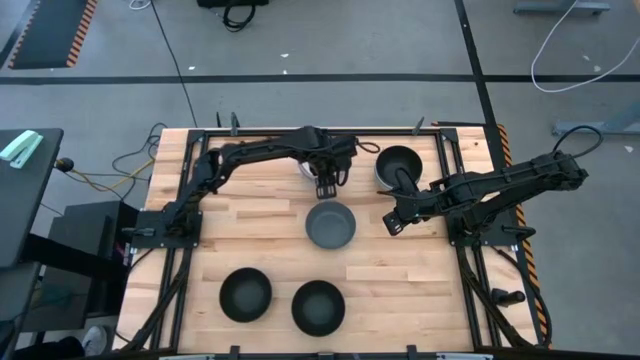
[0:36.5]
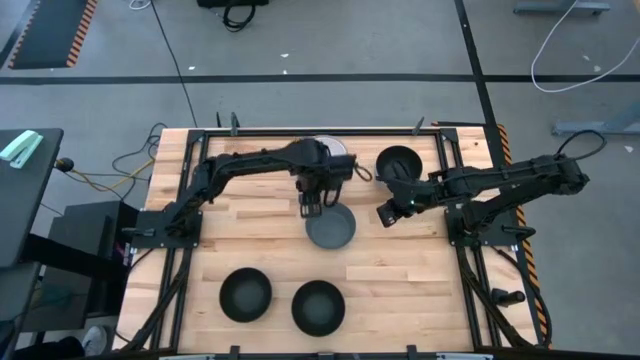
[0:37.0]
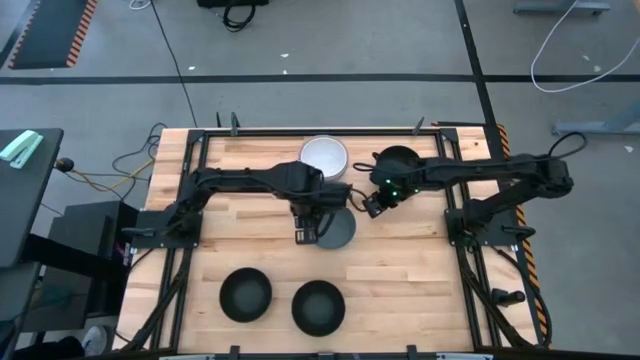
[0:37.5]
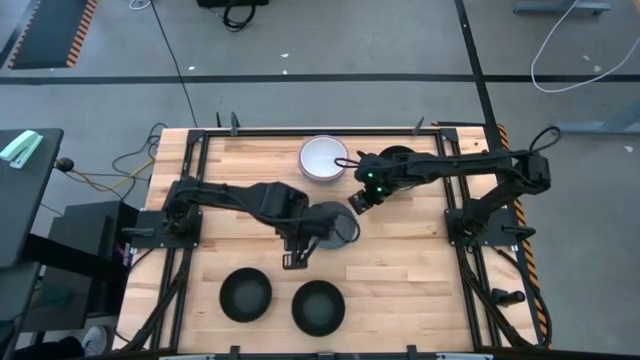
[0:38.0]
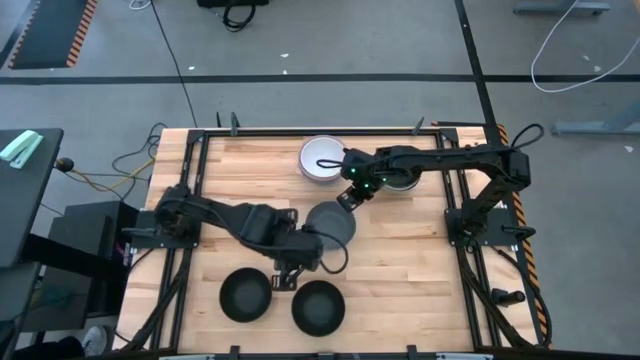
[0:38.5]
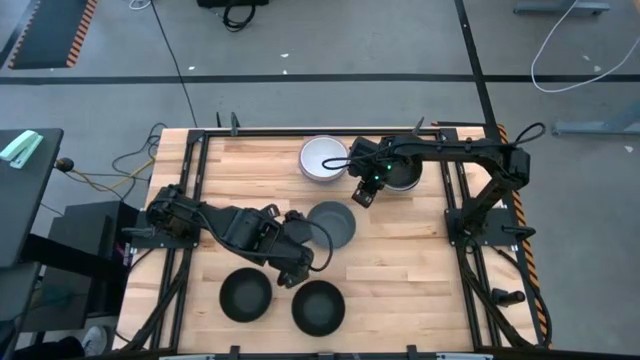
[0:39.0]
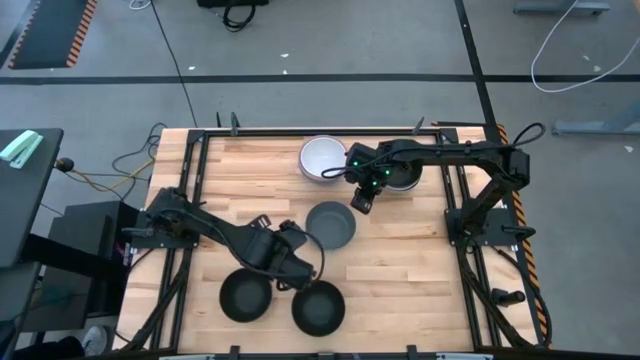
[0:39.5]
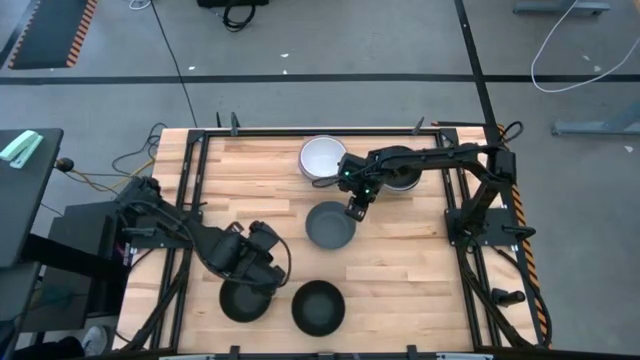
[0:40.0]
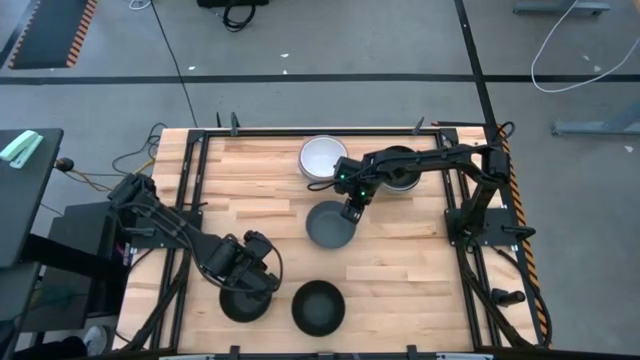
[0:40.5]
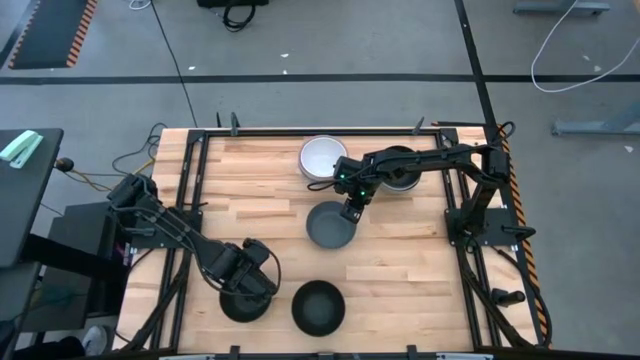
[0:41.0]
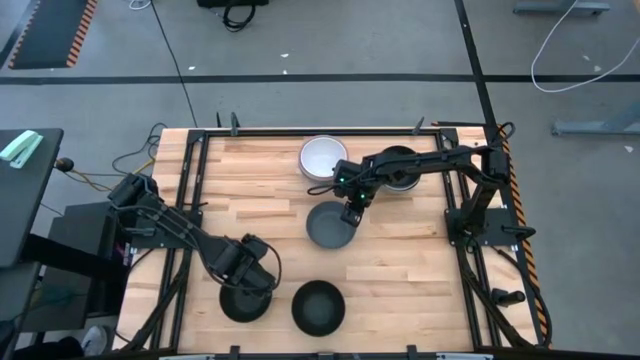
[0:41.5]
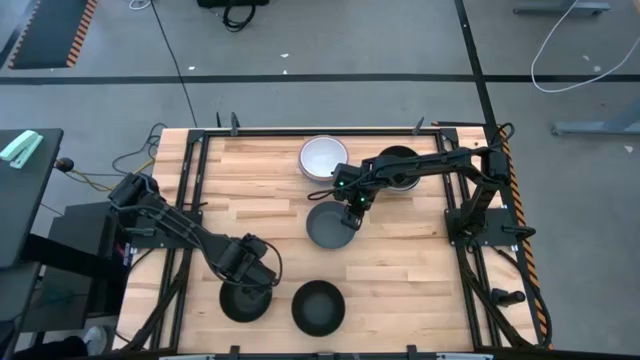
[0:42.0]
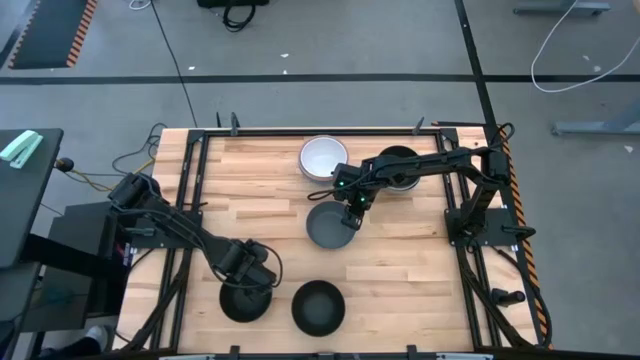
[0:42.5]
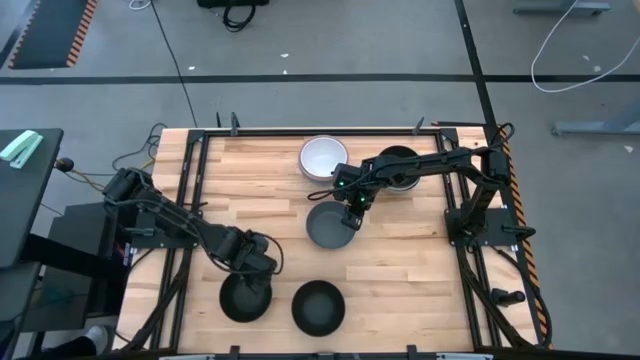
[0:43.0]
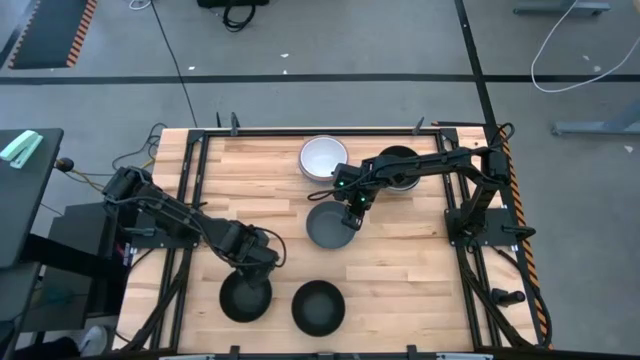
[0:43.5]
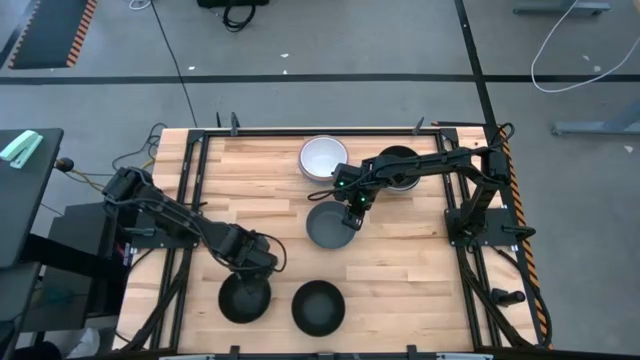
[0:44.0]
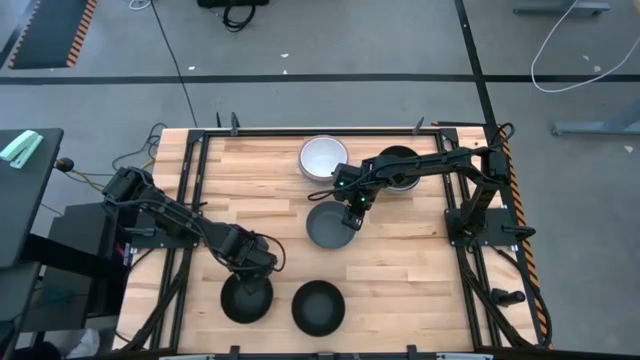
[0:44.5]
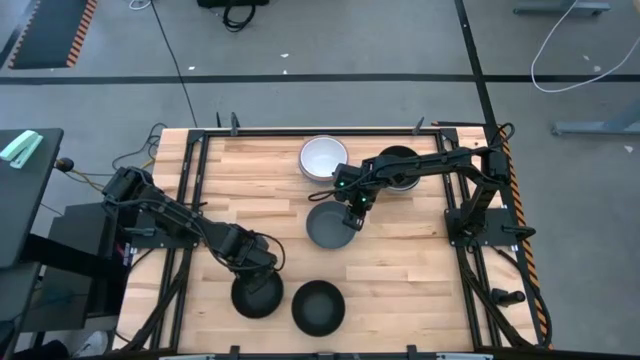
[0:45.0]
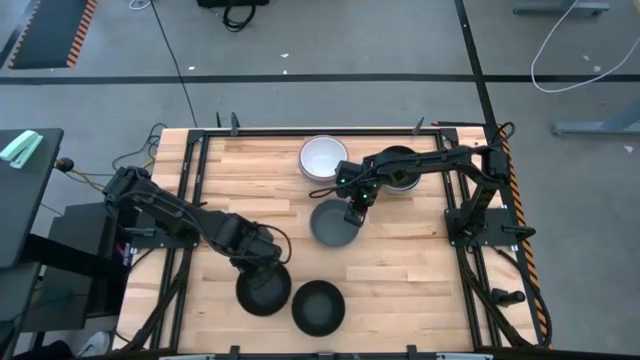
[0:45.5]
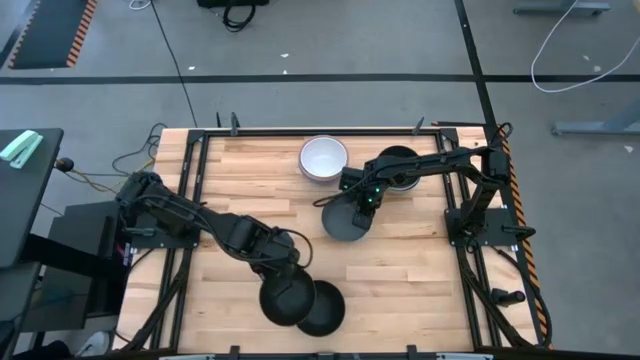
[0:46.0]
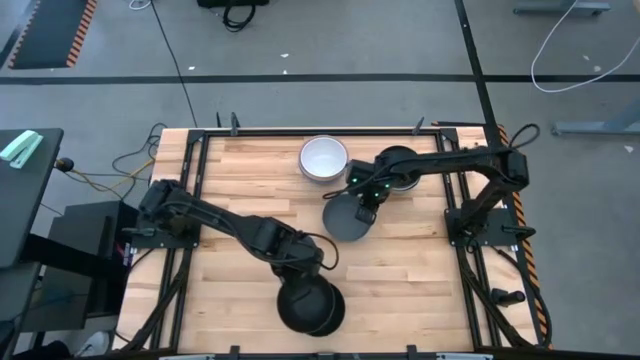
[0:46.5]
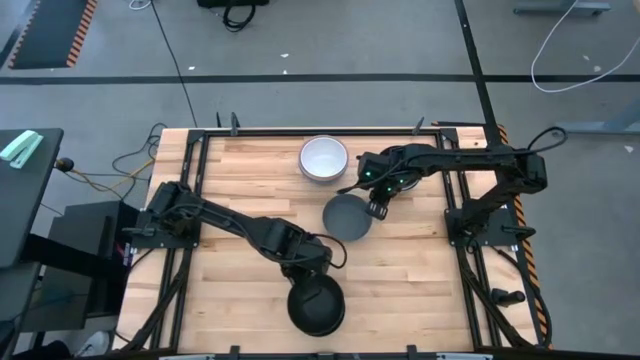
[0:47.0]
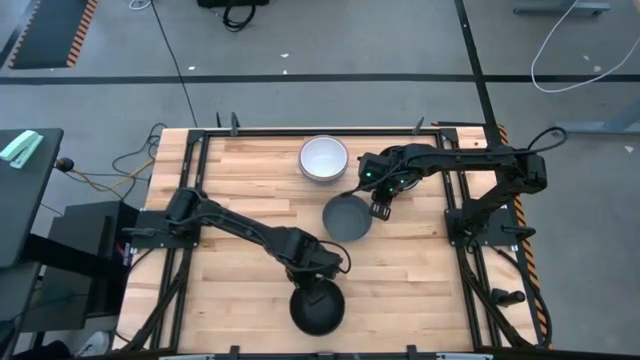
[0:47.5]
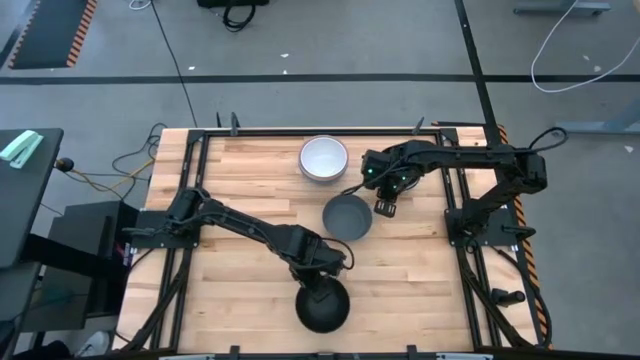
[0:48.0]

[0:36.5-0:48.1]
Task: Nest bowls inside each other
Stack the left black bowl on top of the right black bowl

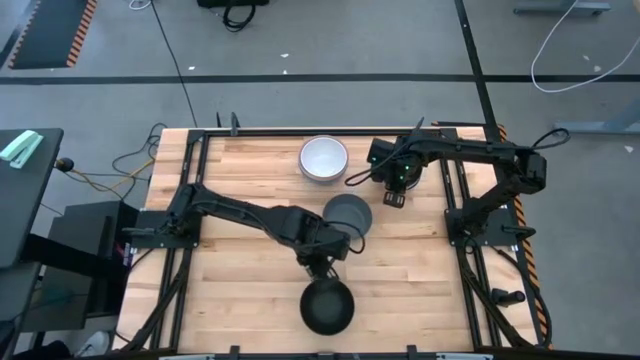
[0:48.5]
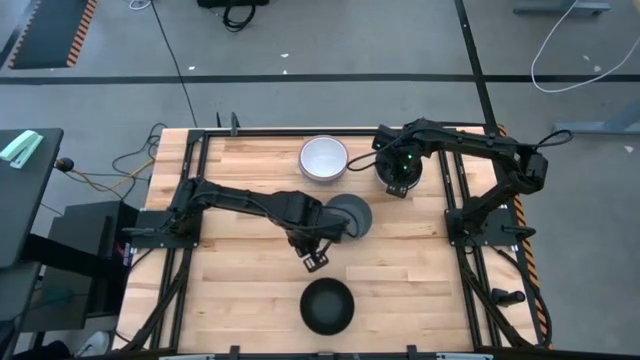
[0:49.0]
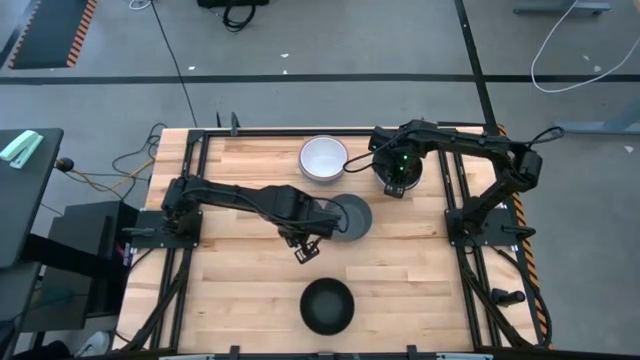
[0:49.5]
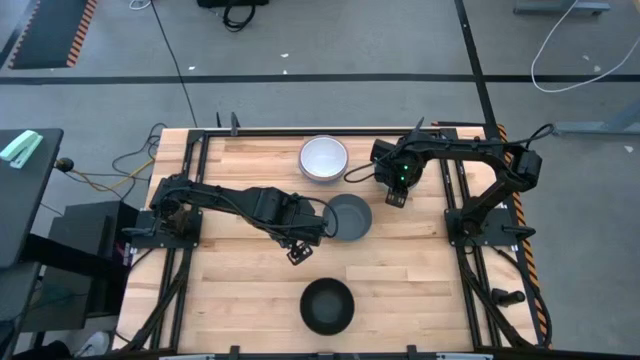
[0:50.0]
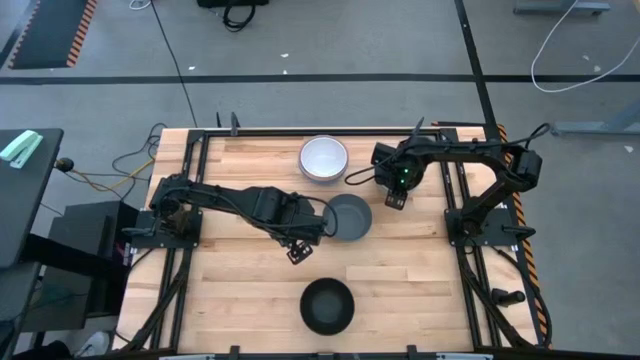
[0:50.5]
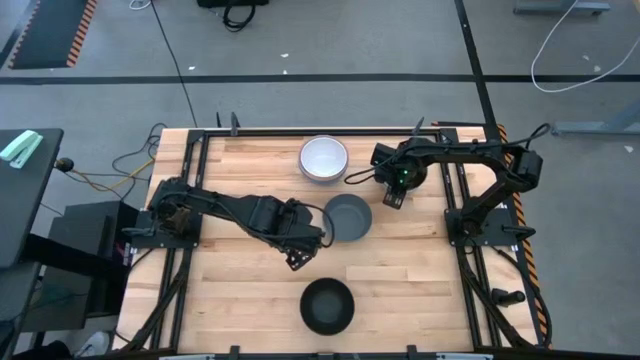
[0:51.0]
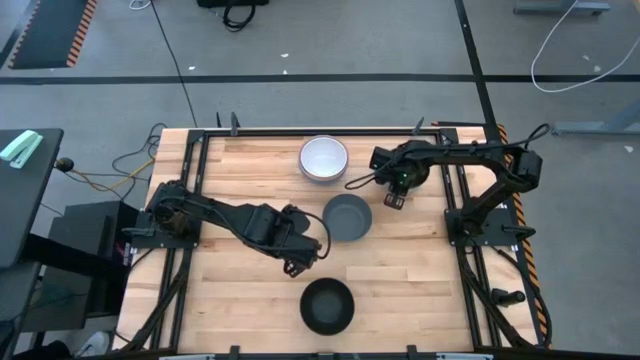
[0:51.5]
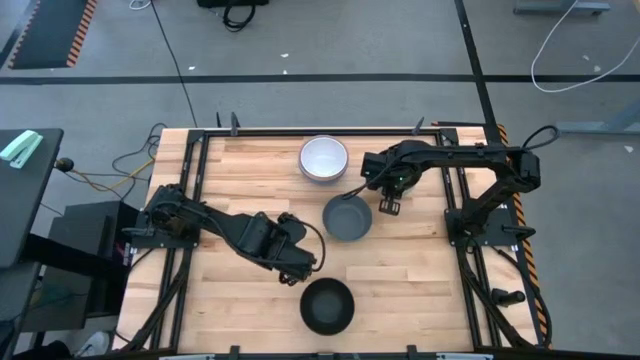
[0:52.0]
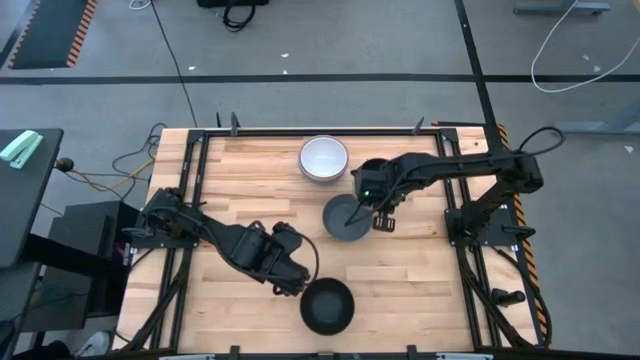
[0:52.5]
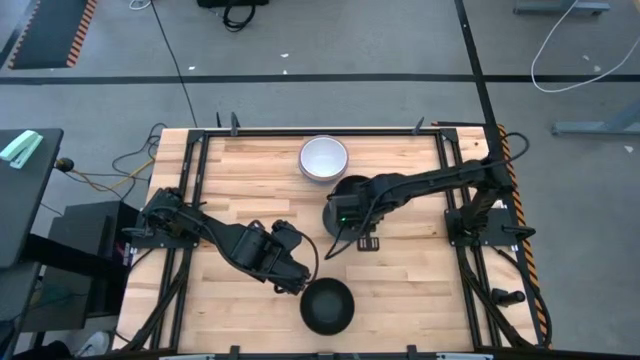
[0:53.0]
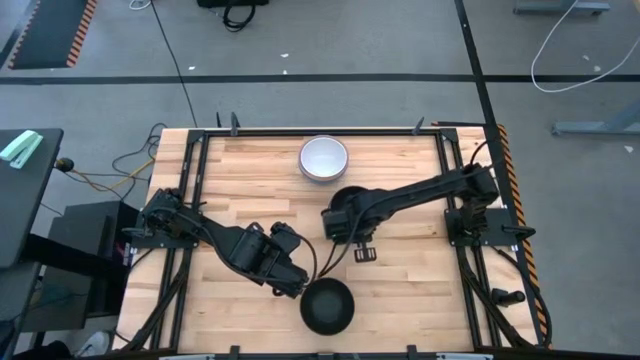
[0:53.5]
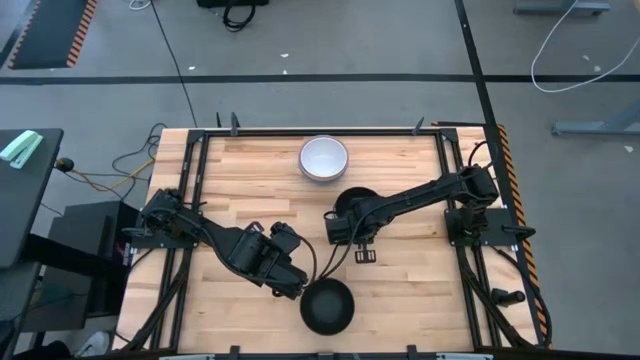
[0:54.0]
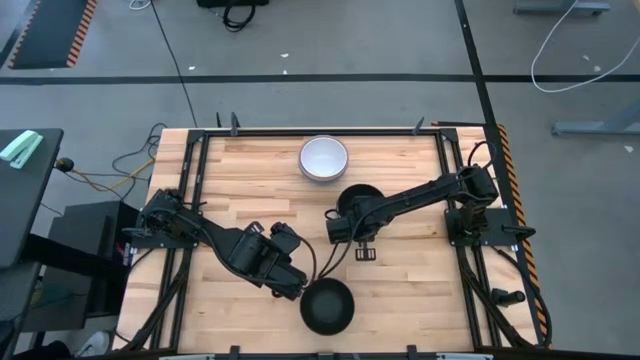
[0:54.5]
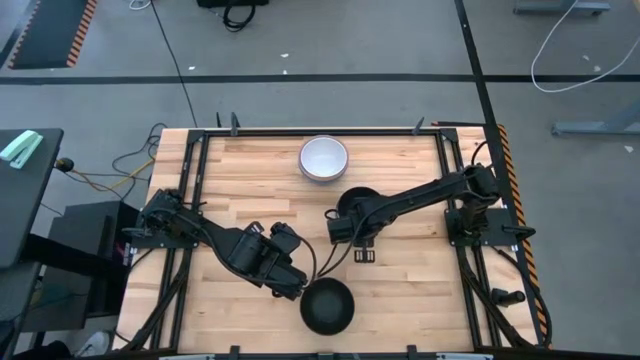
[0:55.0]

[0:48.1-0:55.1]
Stack the right stacked bowls on top of the gray bowl

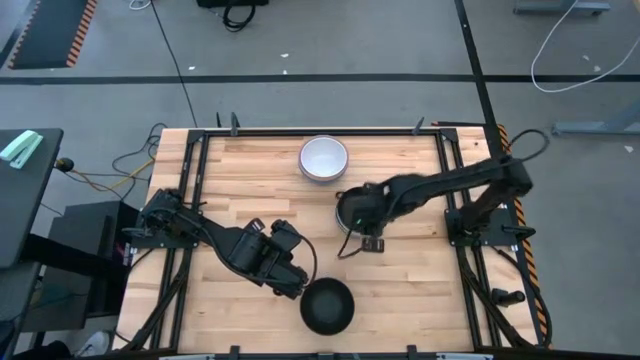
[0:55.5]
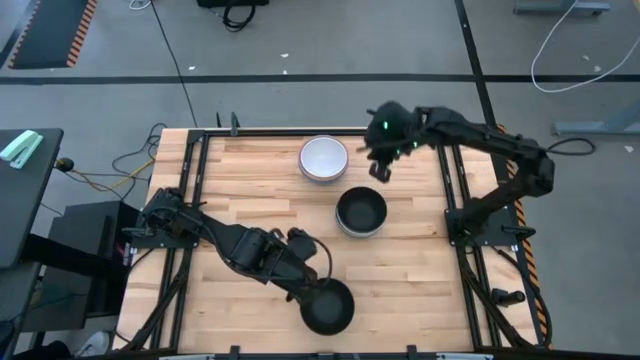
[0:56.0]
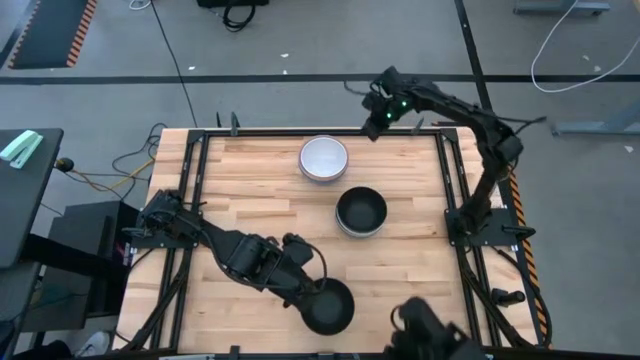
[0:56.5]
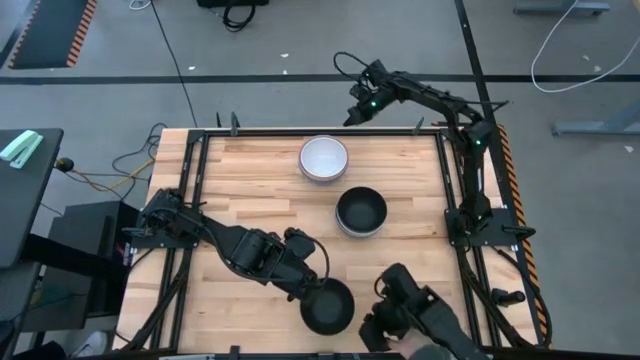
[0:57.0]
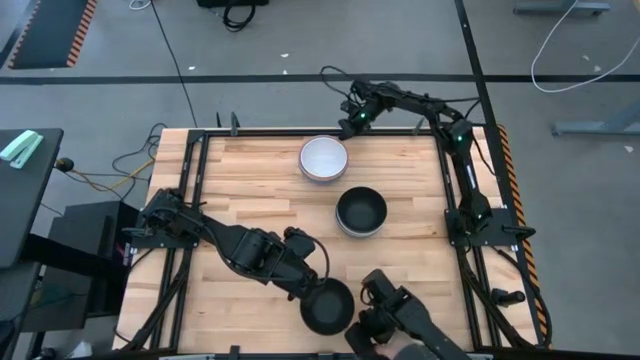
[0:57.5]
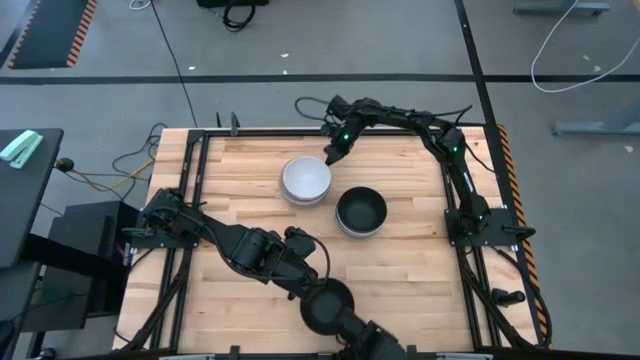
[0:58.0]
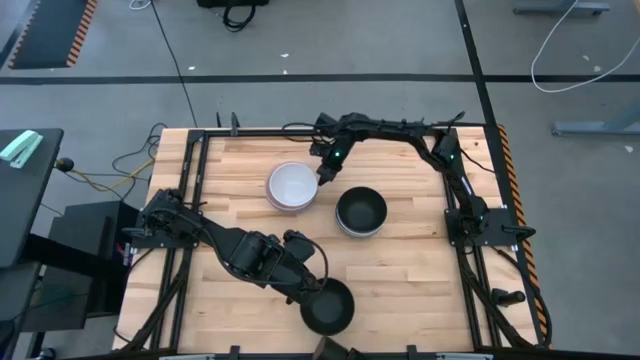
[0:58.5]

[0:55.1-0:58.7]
Adjust the top stacked bowls
